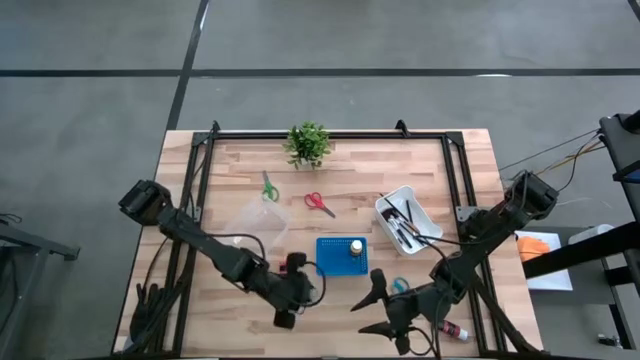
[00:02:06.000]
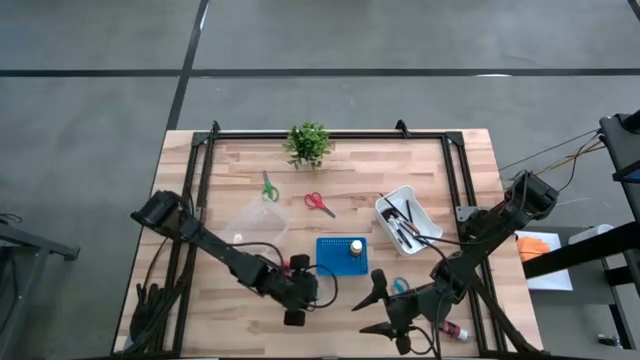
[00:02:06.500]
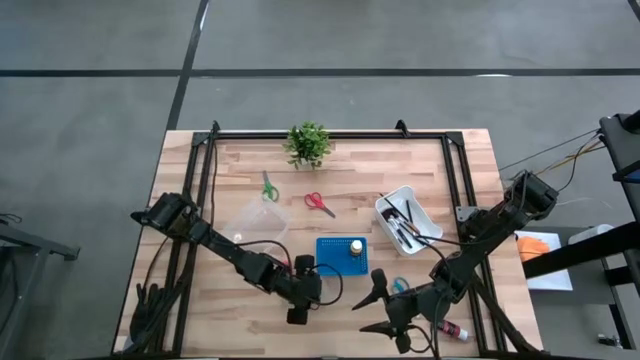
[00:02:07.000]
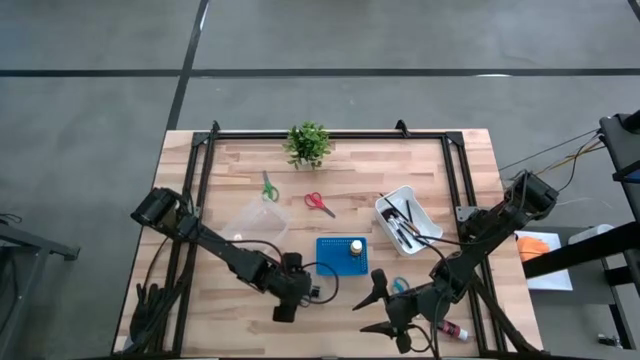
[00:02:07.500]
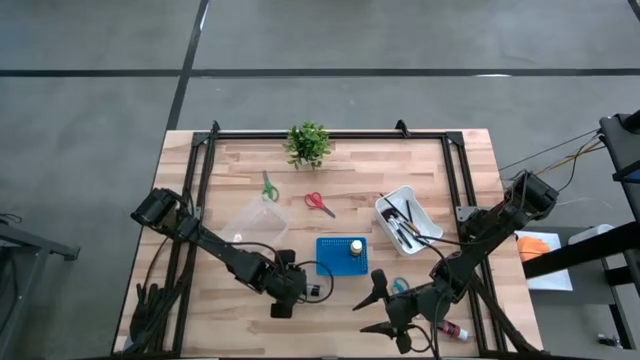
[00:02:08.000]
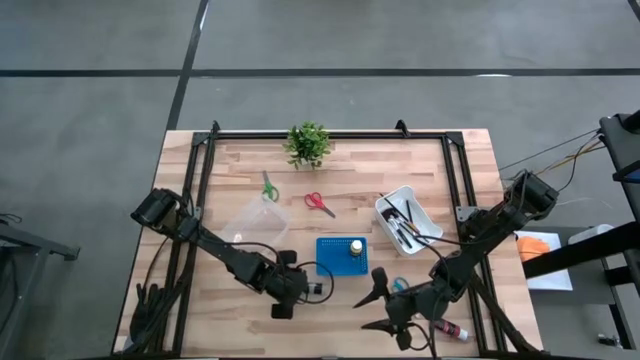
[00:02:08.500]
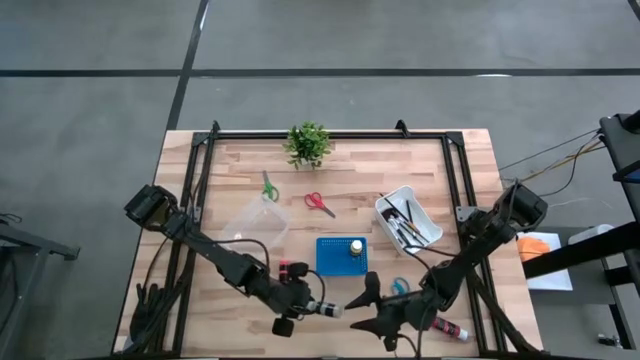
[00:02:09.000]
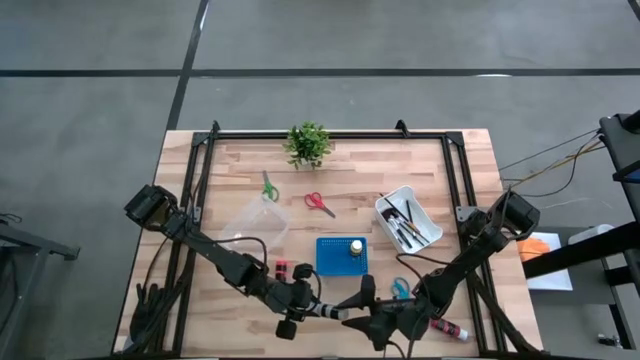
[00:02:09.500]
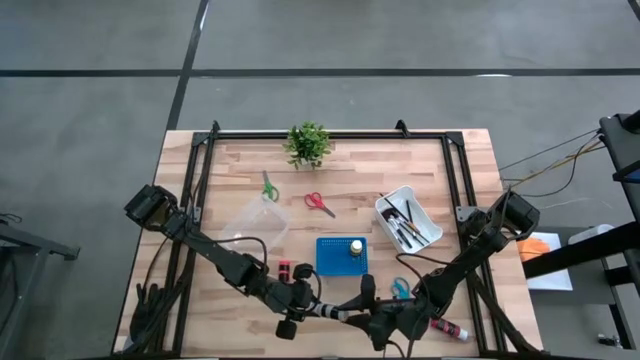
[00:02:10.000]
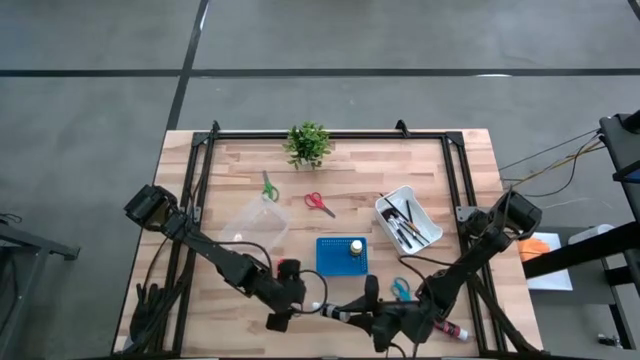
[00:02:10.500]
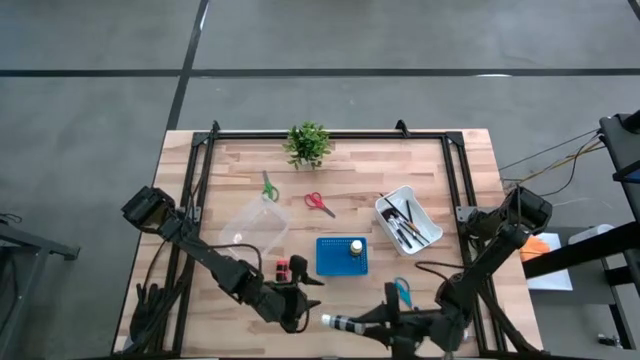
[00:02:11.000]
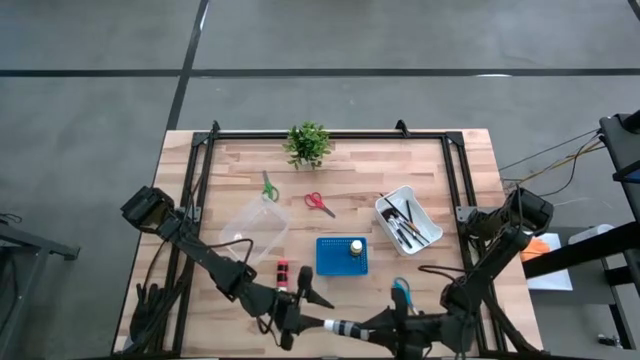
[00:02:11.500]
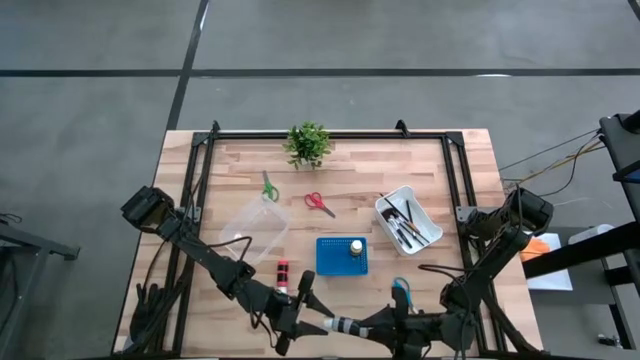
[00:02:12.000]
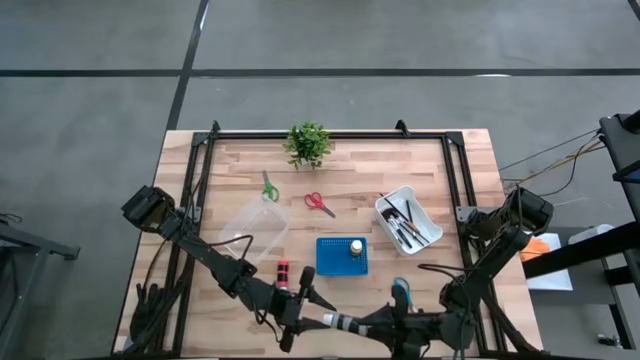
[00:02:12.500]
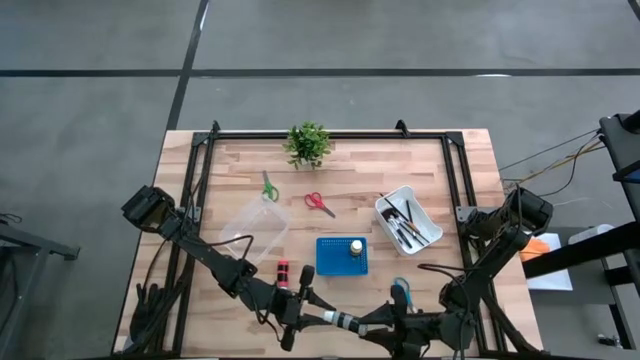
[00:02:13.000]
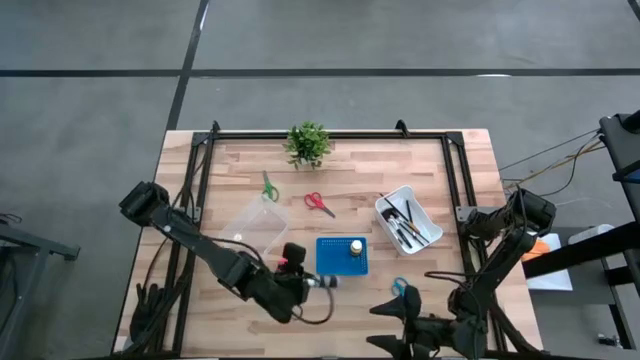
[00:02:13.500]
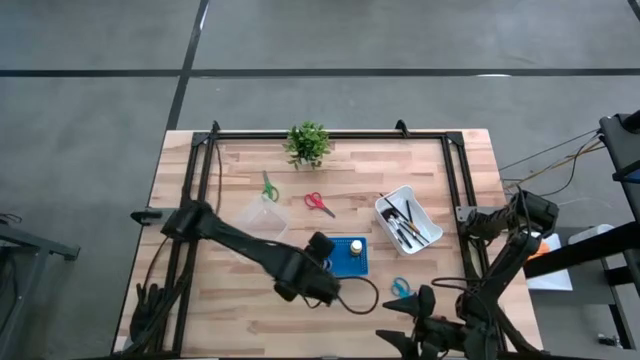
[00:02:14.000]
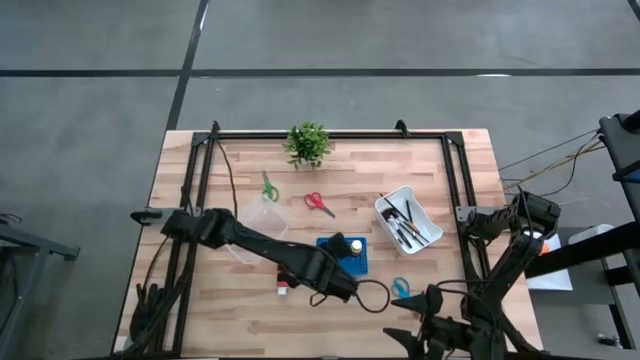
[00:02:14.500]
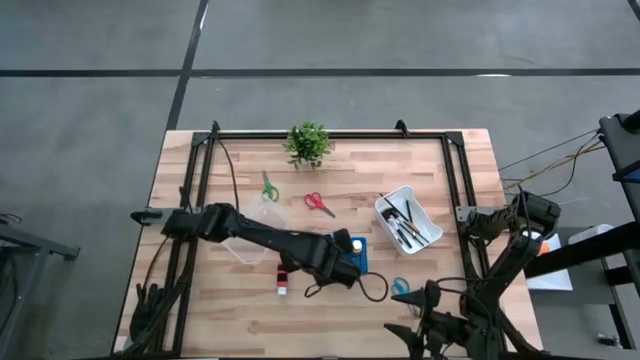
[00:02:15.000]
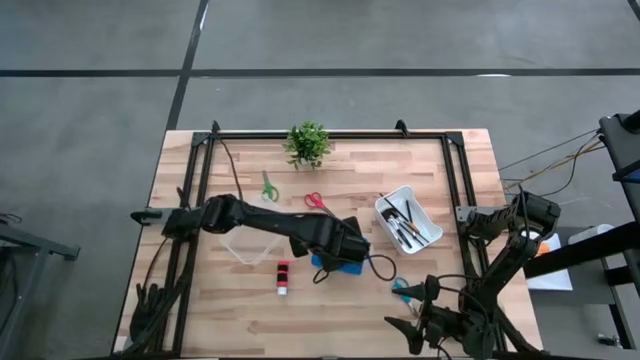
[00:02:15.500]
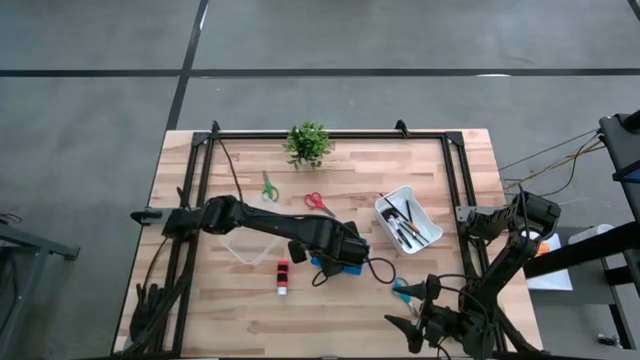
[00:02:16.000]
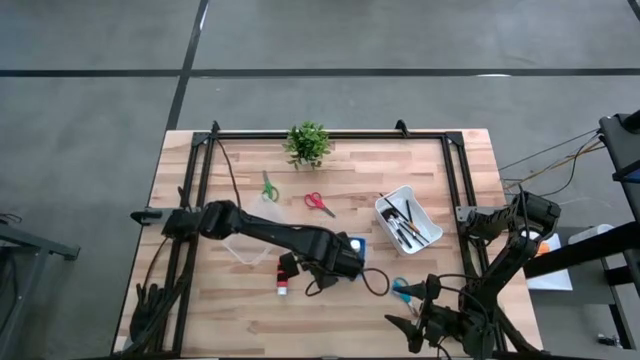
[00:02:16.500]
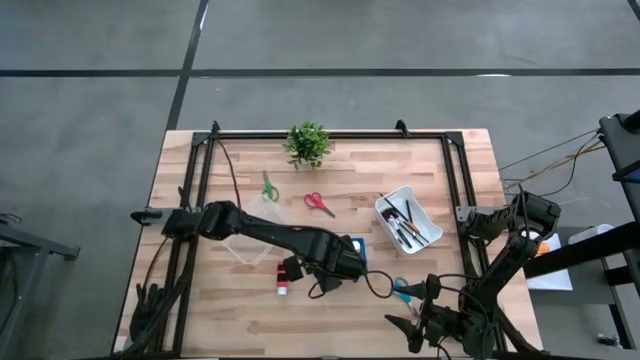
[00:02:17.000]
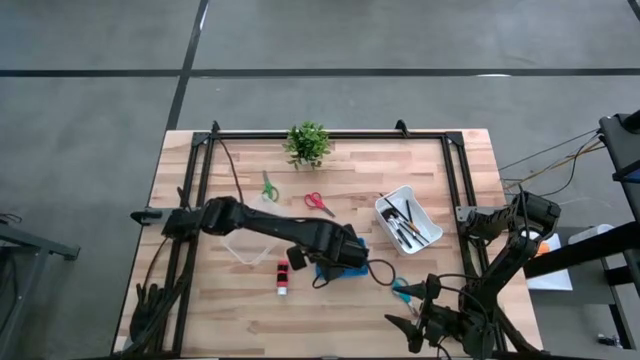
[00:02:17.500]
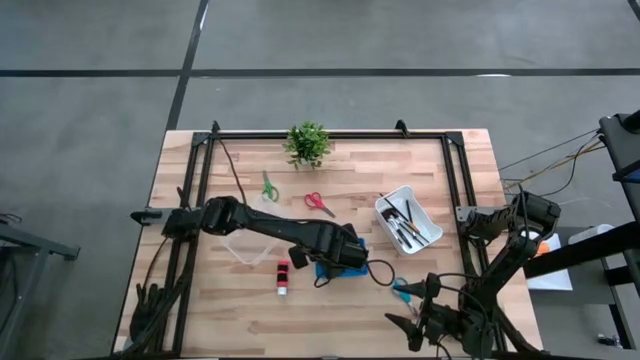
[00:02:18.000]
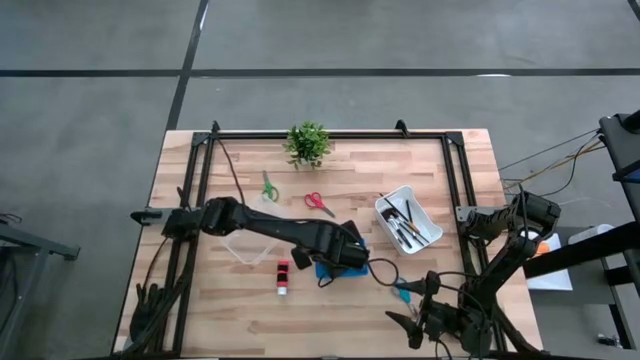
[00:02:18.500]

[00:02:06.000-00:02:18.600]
Task: Pick & Place Paint Supplies
Put the gray paint bottle in the blue bin

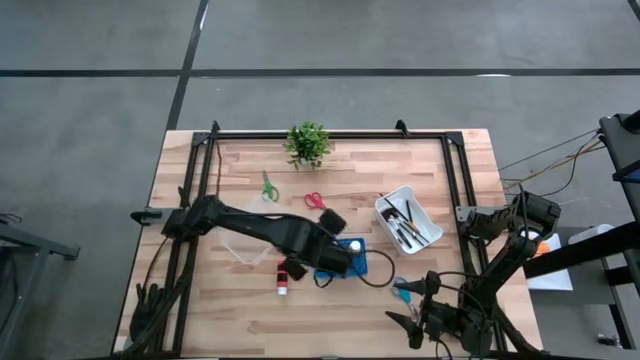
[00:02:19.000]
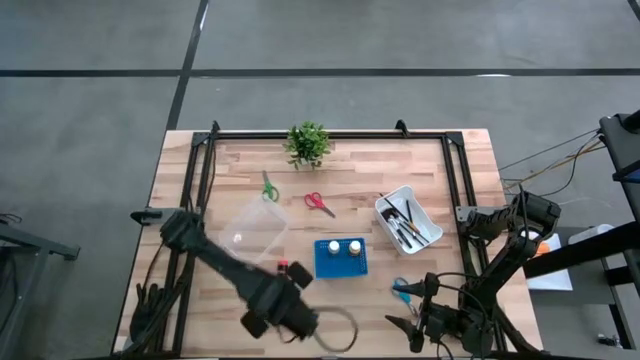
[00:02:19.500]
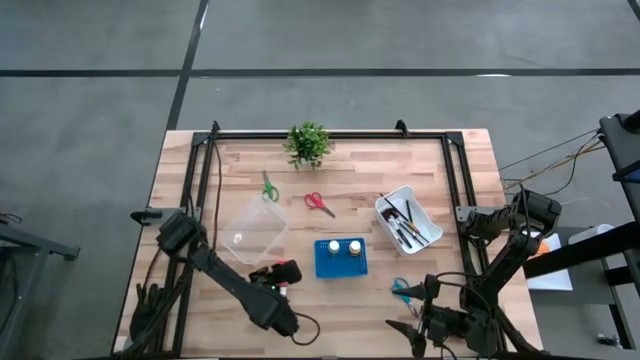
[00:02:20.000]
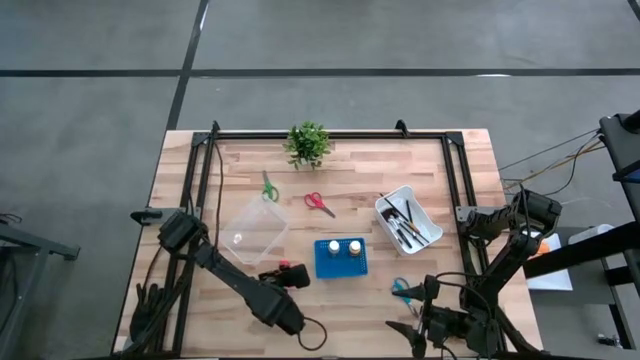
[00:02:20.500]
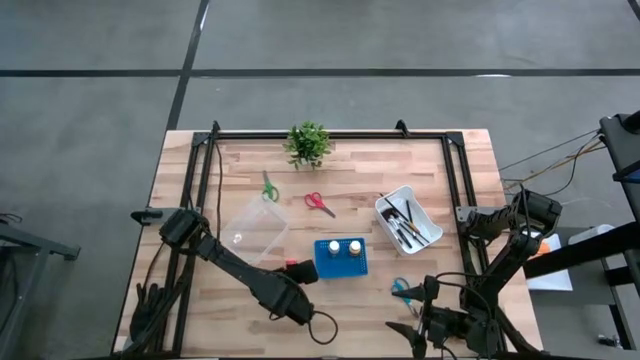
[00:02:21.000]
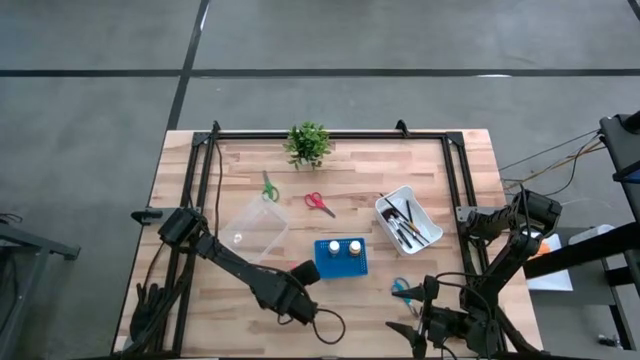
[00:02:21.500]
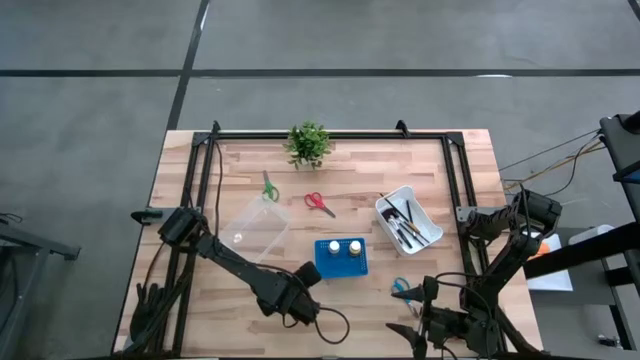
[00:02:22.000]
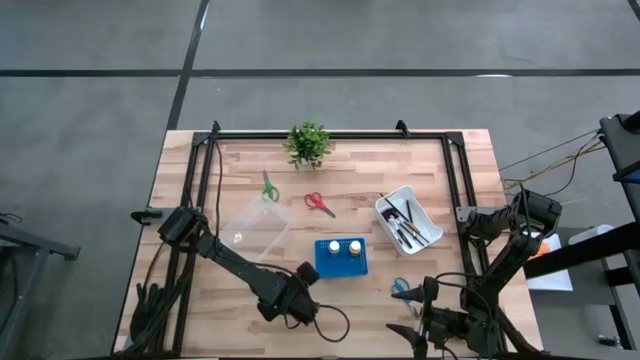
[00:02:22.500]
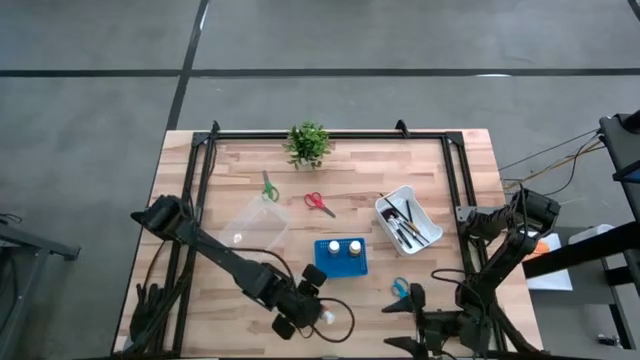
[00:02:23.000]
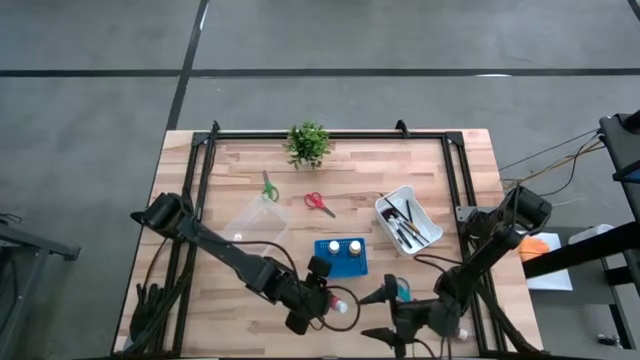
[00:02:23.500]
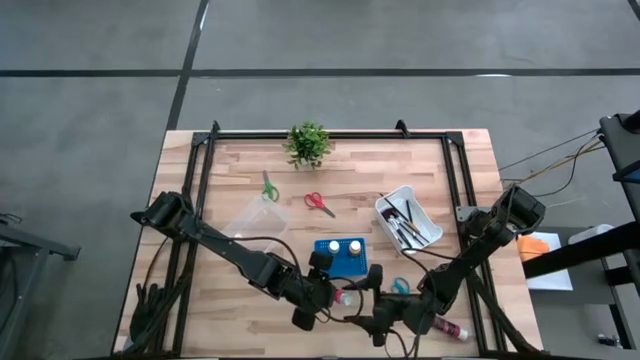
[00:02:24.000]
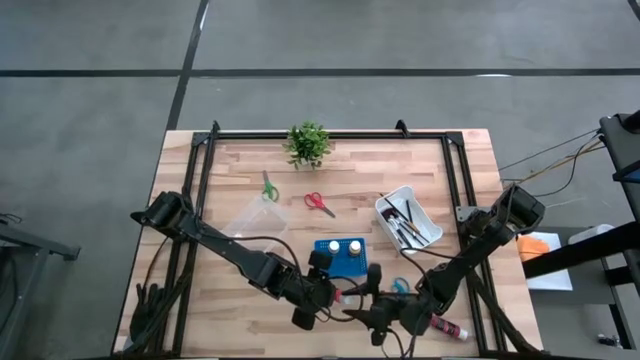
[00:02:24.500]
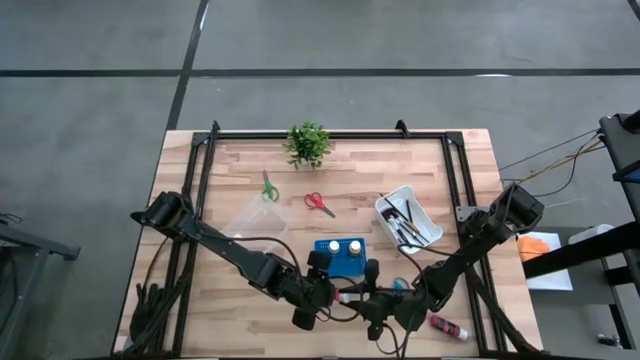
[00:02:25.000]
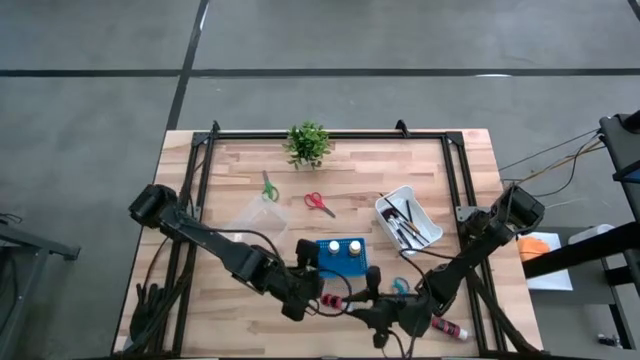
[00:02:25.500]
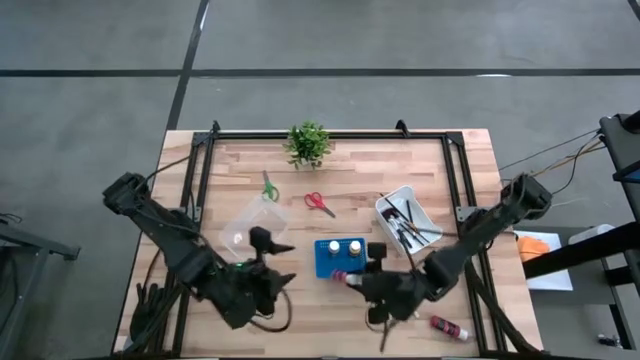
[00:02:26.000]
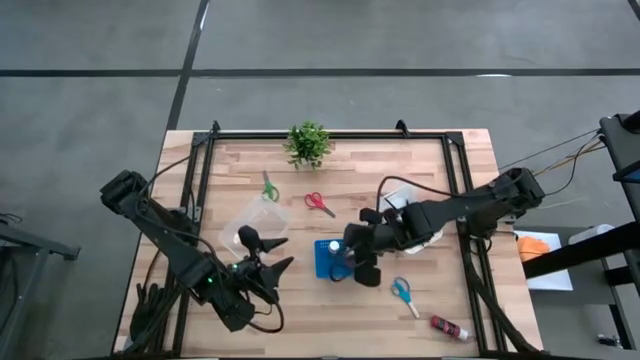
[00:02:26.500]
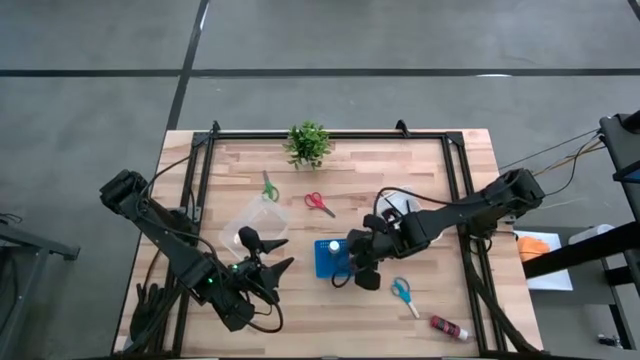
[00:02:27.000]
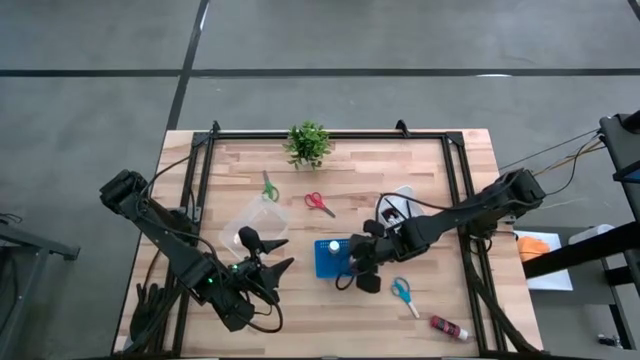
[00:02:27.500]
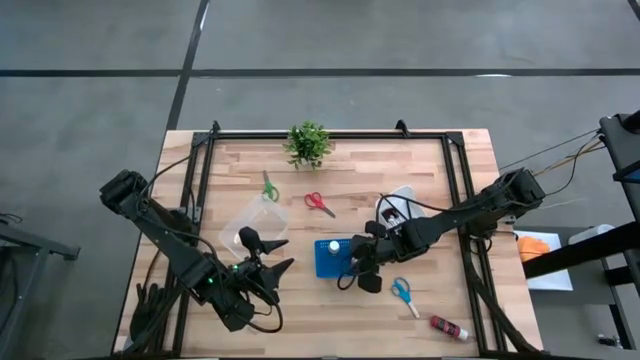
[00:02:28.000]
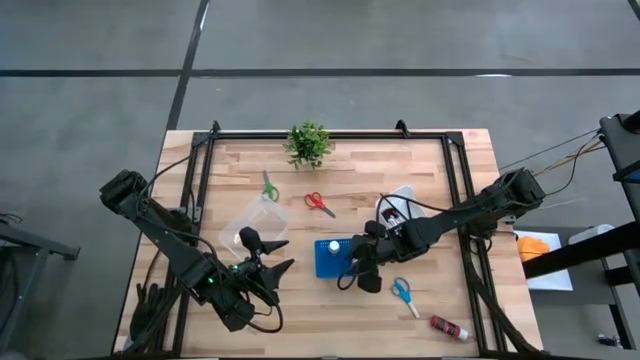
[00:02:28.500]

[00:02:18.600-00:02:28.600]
Put the orange paint bottle in the blue bin
